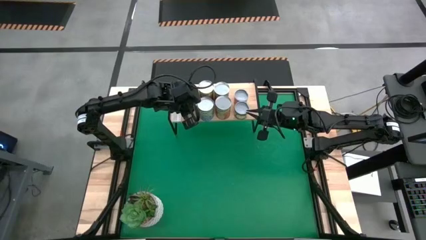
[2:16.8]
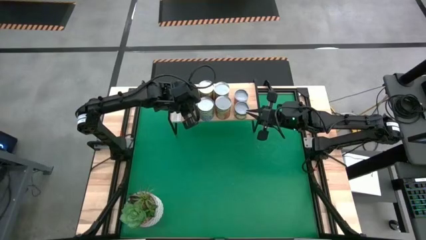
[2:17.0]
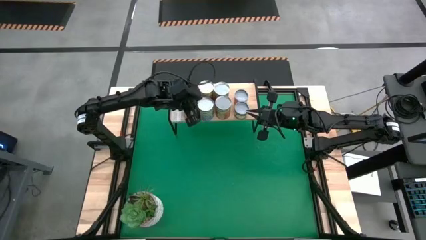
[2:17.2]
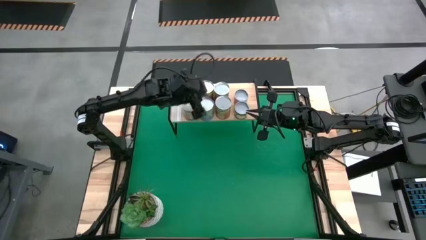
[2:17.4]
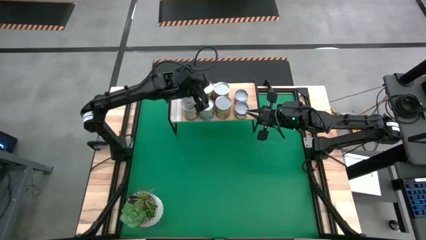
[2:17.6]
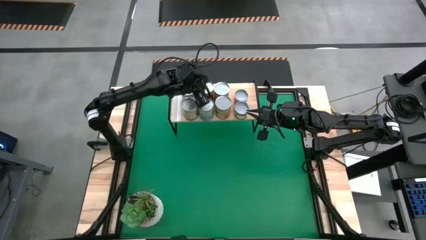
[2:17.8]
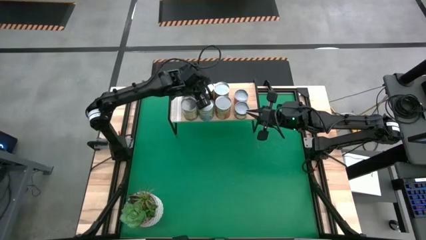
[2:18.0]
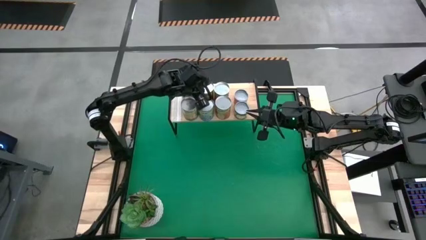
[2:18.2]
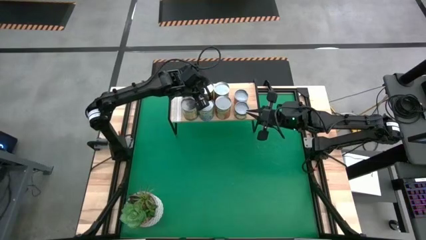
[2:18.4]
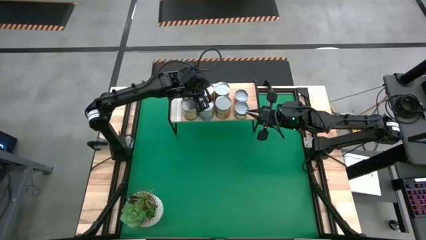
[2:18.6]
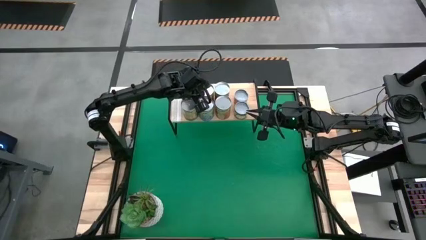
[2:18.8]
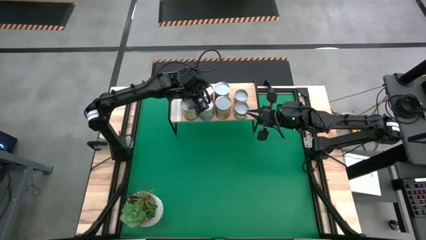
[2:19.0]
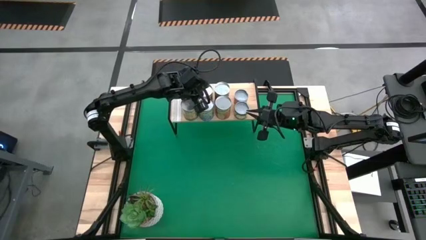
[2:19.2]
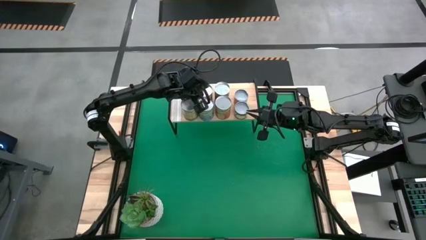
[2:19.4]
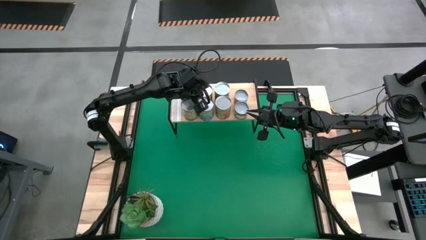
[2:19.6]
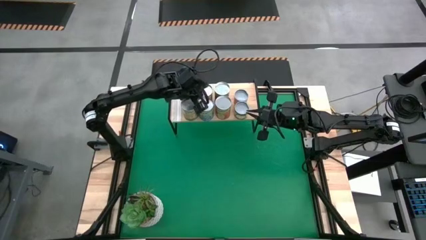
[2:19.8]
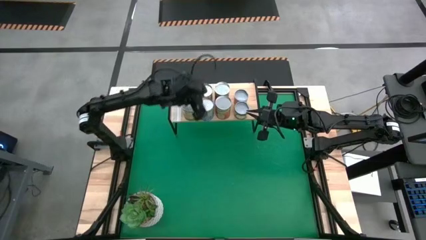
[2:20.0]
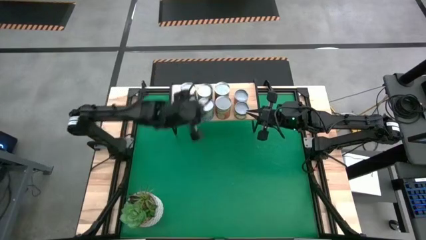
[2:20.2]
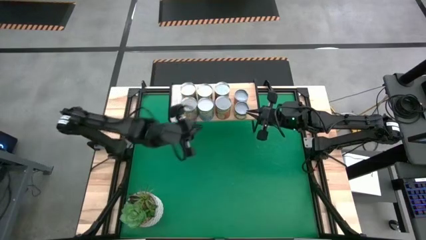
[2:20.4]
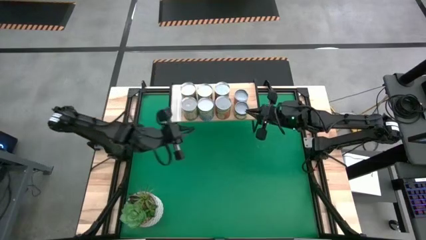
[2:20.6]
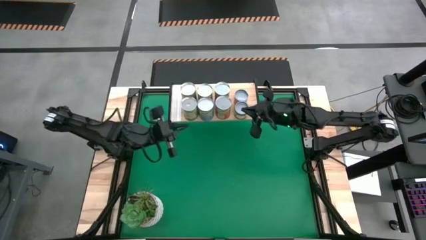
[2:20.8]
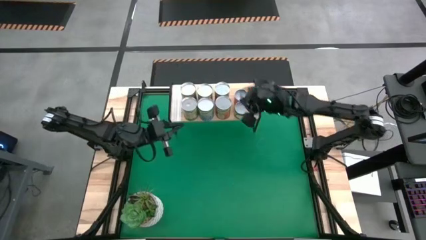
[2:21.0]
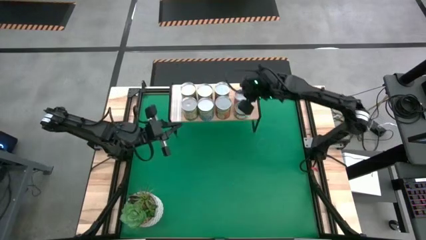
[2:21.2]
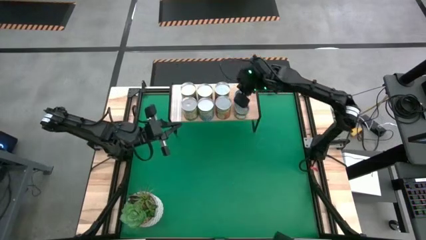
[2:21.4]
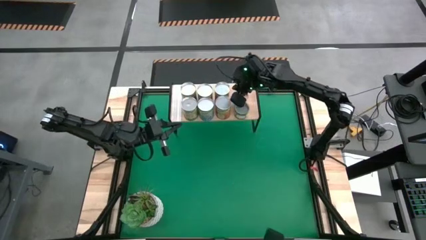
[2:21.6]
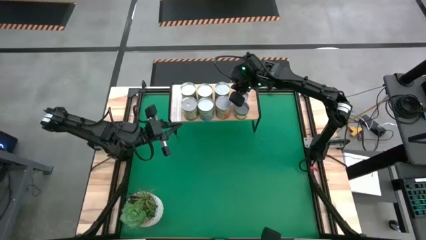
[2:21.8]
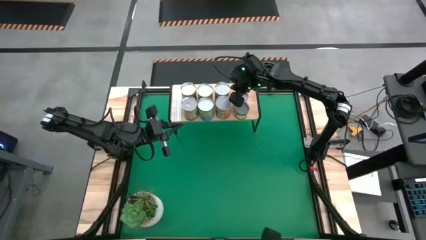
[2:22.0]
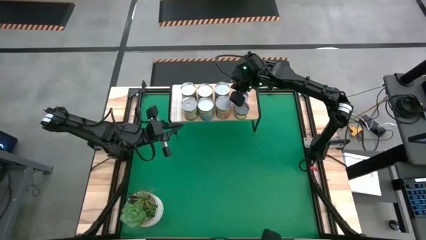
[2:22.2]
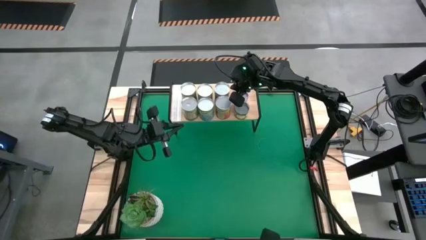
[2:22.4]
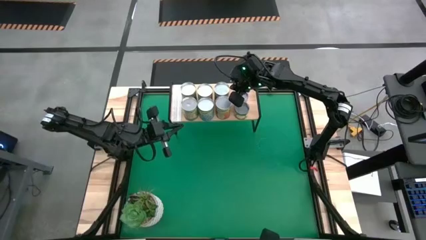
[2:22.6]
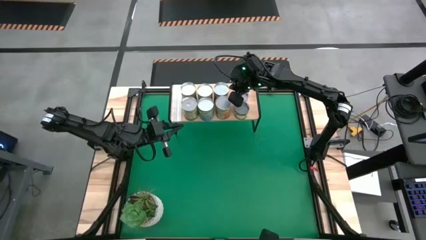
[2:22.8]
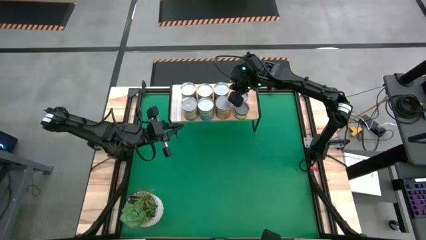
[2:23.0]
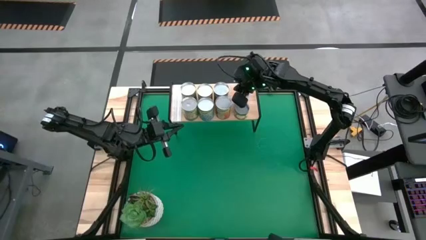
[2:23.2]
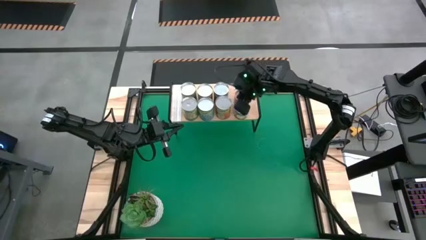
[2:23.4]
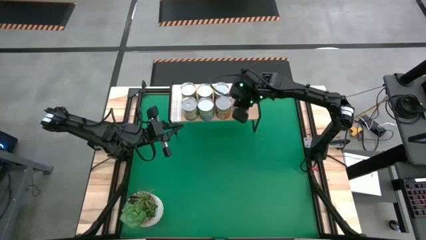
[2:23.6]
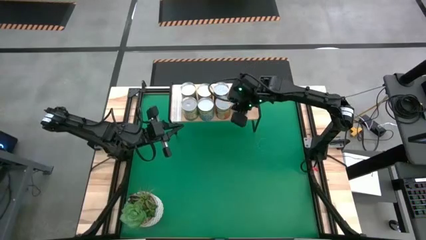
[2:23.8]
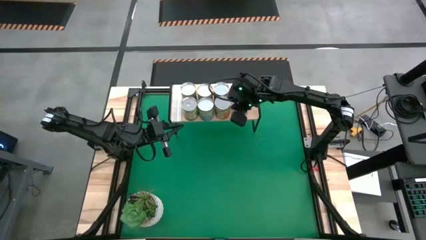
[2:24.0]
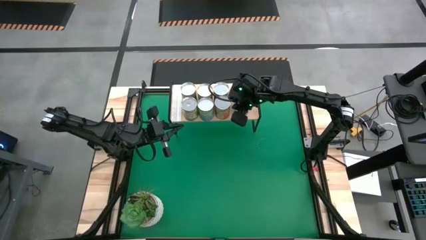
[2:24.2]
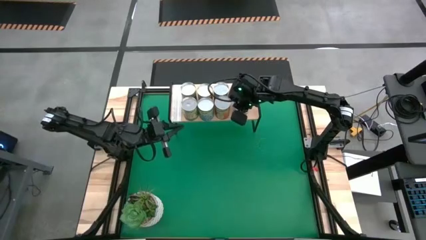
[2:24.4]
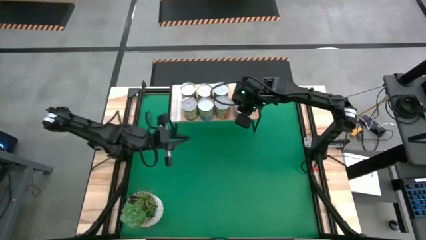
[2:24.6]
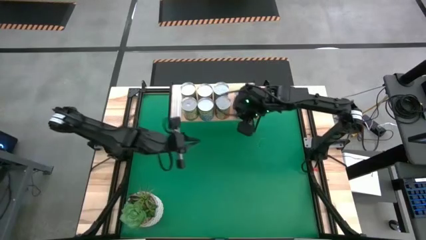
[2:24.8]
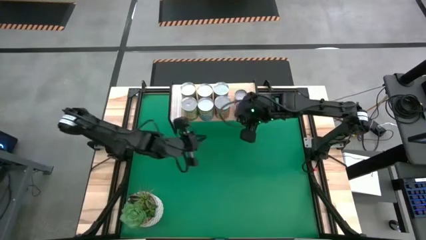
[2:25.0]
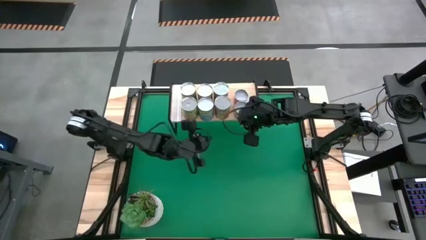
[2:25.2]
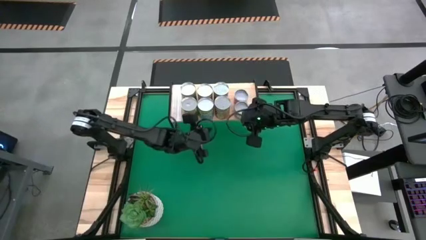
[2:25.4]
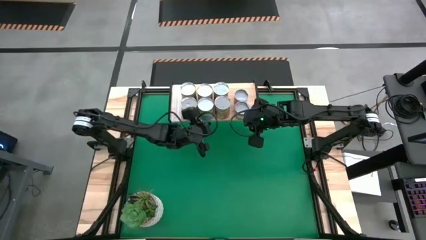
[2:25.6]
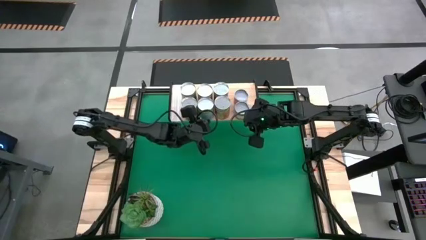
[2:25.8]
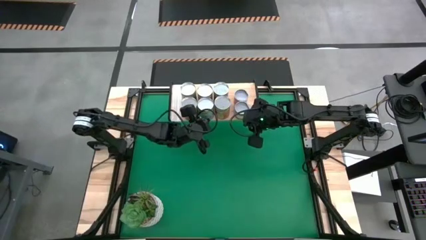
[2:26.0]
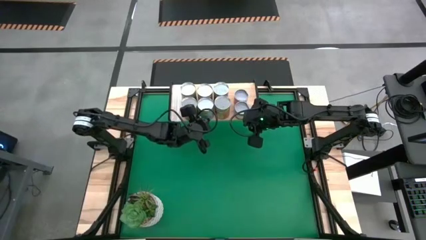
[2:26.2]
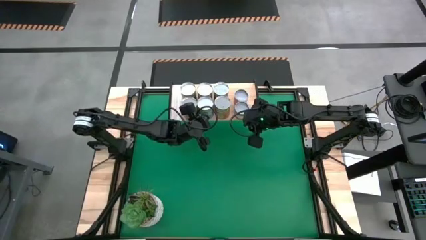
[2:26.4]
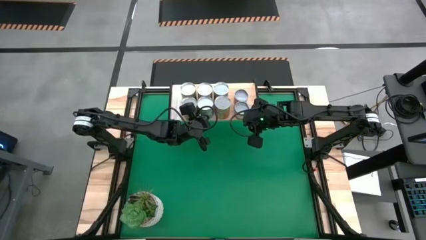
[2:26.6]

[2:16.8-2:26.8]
Task: Pick and place cans onto a shelf
Adjust the canned goods on the shelf

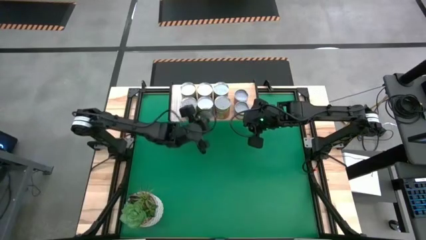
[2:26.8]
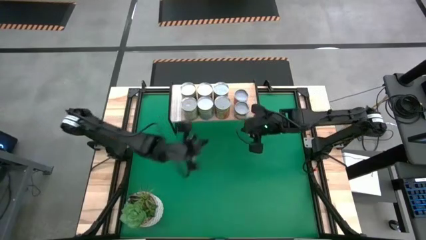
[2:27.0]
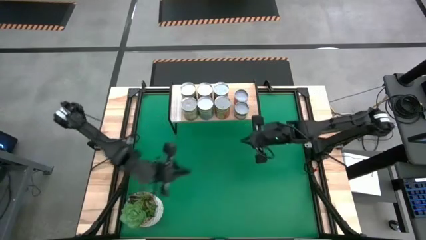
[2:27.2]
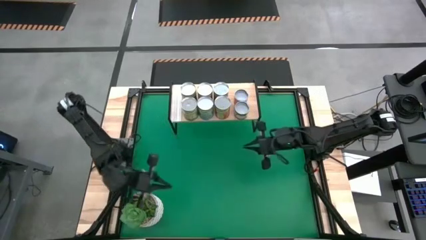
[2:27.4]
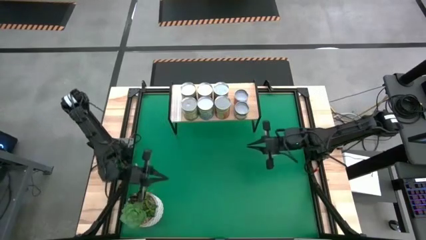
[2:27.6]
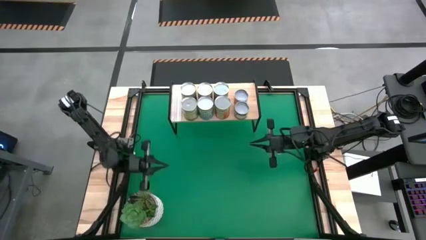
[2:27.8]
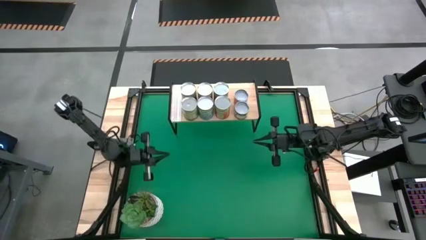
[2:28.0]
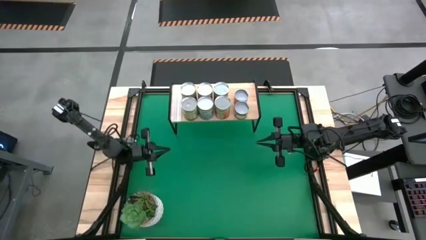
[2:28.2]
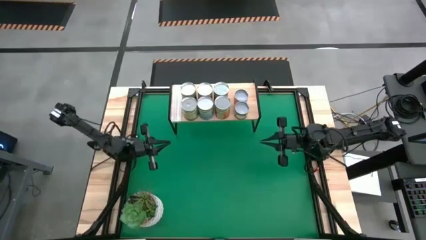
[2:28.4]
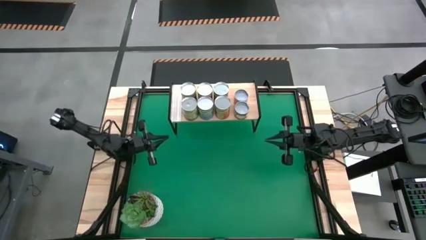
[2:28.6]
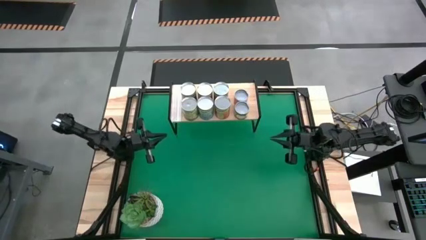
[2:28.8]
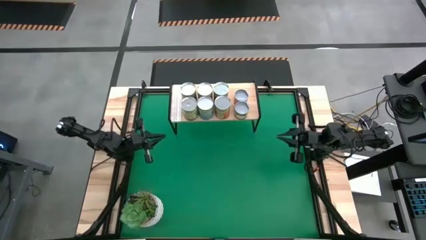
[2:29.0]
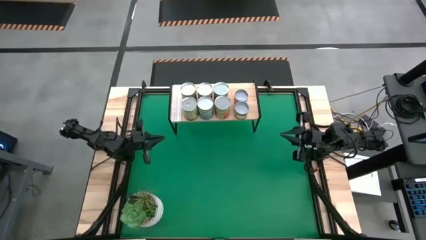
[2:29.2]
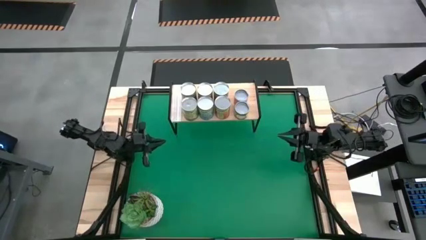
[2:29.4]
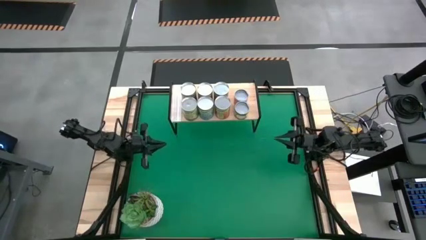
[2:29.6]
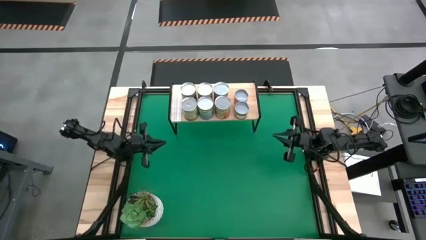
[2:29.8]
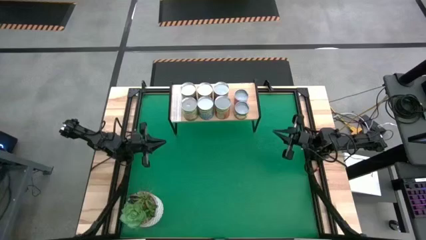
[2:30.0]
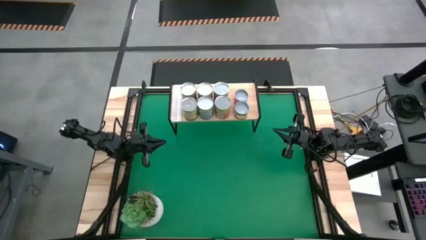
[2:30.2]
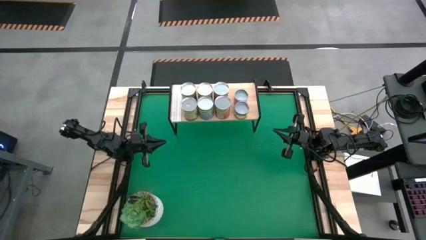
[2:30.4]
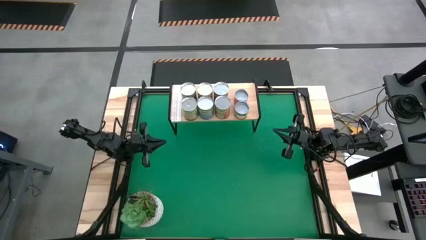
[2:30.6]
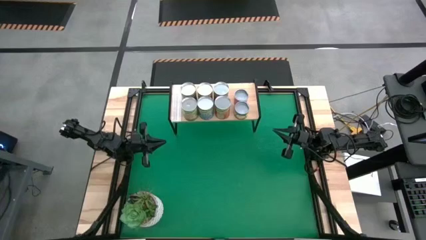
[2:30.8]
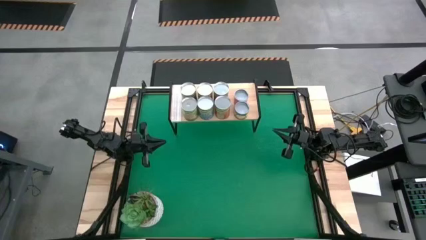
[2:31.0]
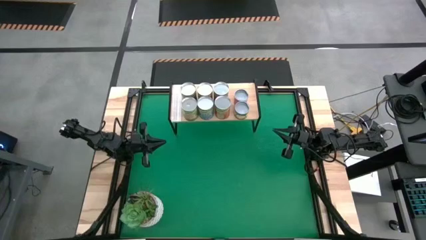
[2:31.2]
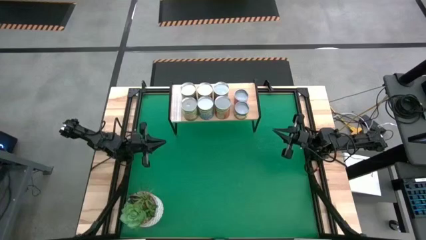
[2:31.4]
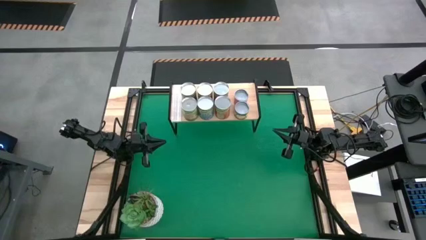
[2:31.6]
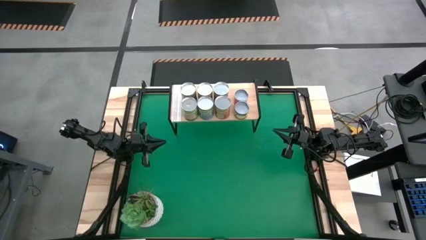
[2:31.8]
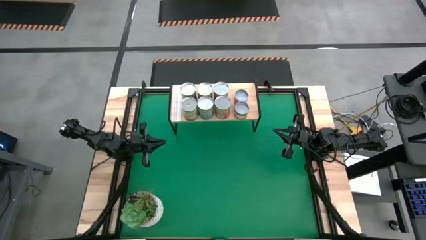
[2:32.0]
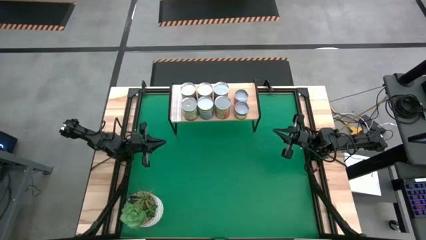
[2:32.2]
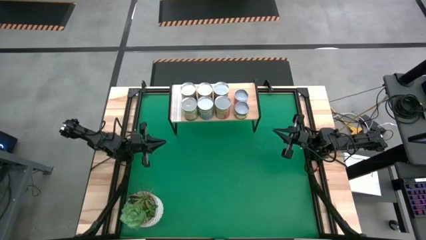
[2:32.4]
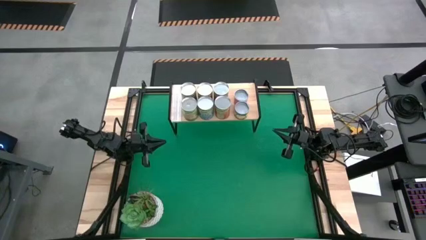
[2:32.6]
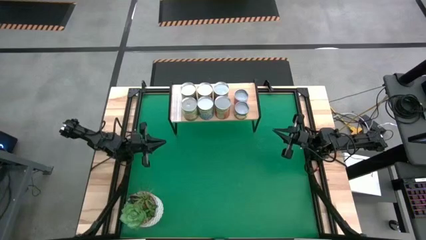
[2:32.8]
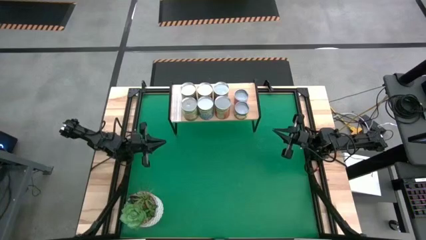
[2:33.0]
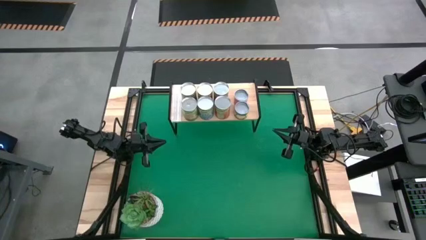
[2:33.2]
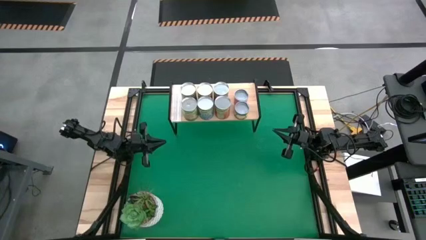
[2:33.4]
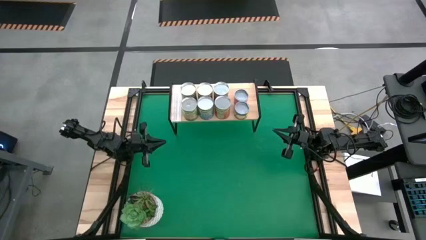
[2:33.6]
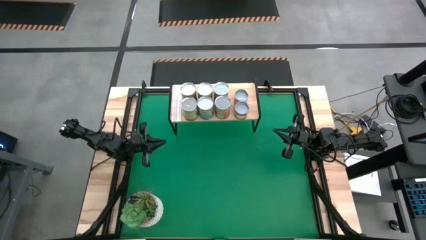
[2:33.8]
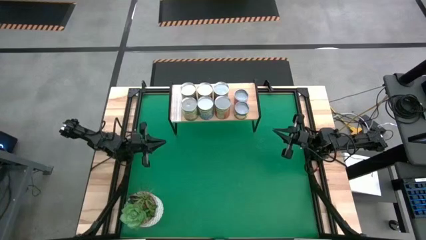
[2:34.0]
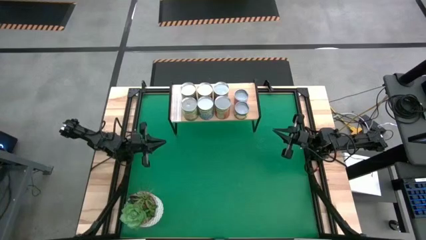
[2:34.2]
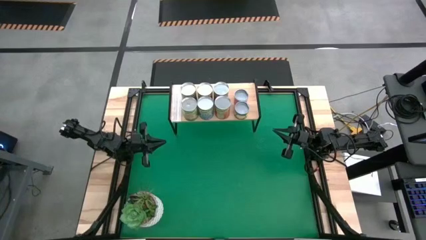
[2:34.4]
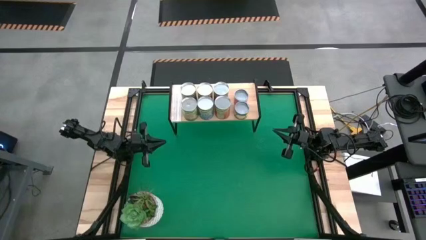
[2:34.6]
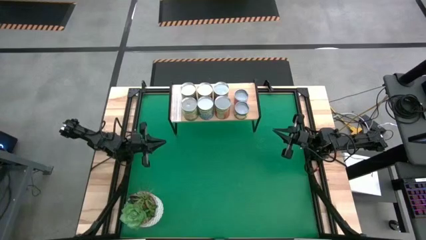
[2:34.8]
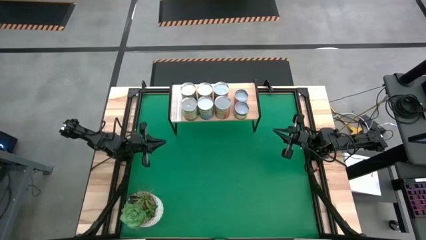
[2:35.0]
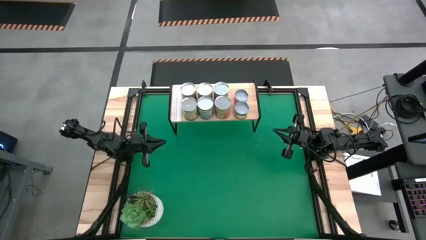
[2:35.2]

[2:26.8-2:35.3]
Return to Home Position
